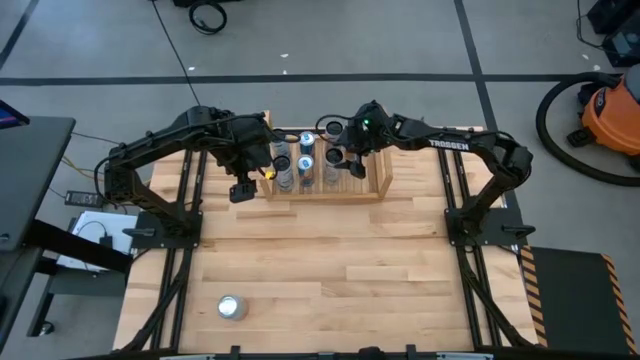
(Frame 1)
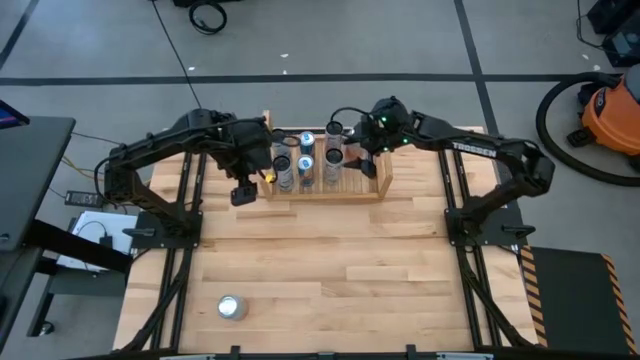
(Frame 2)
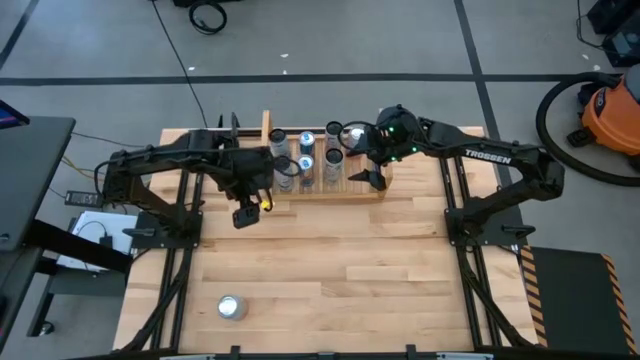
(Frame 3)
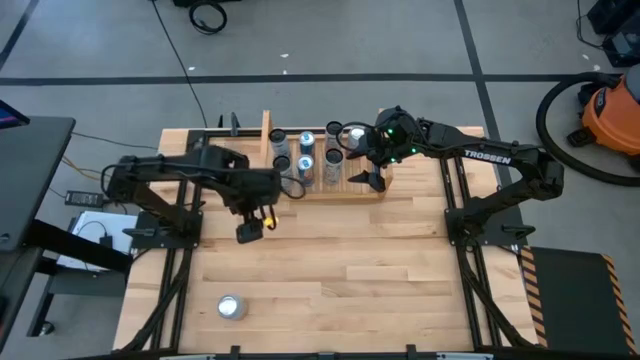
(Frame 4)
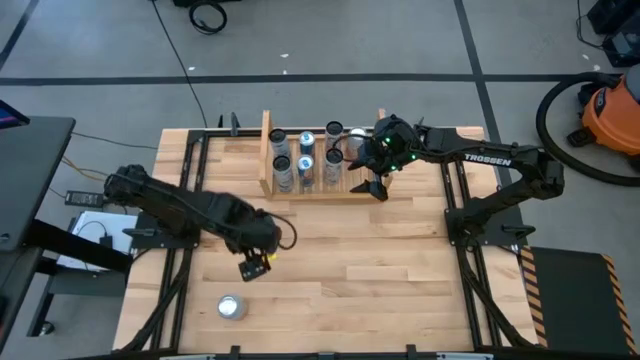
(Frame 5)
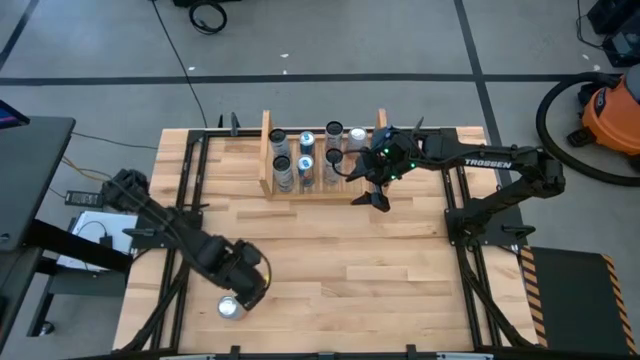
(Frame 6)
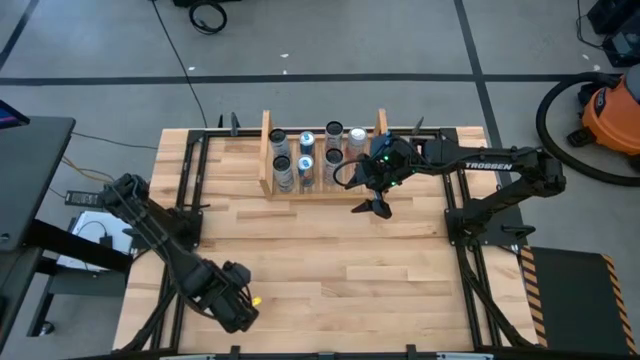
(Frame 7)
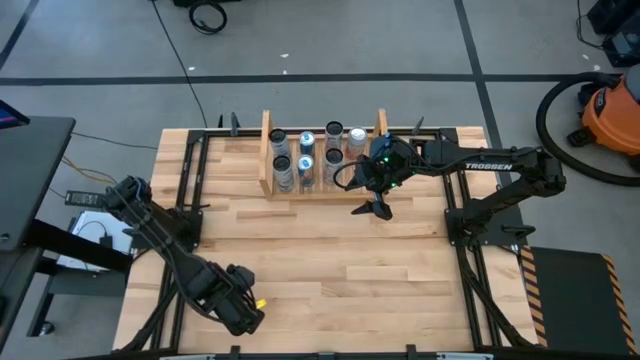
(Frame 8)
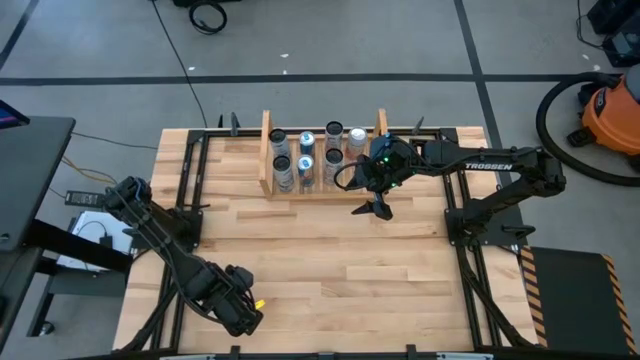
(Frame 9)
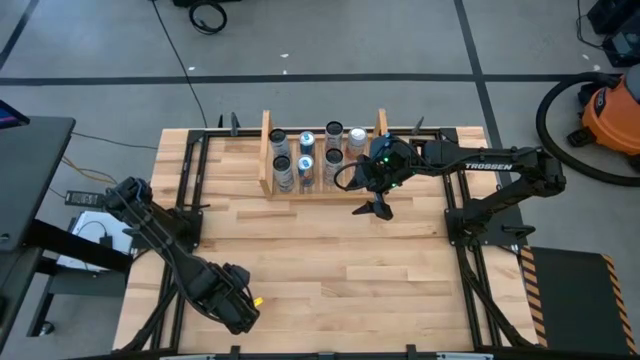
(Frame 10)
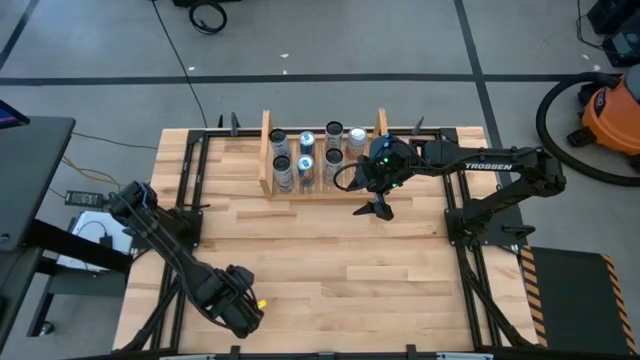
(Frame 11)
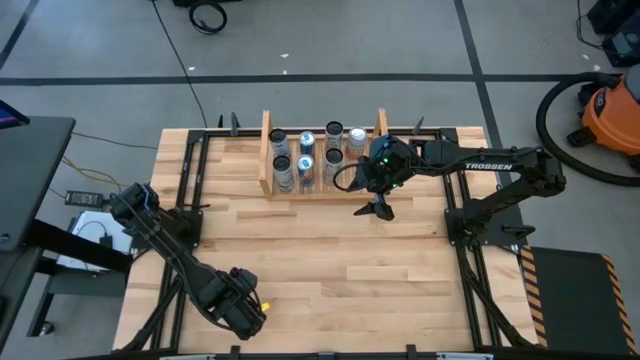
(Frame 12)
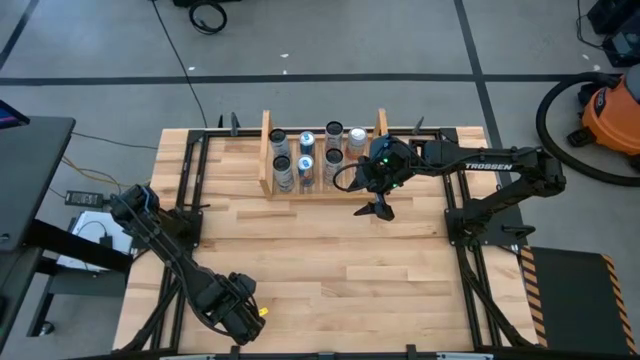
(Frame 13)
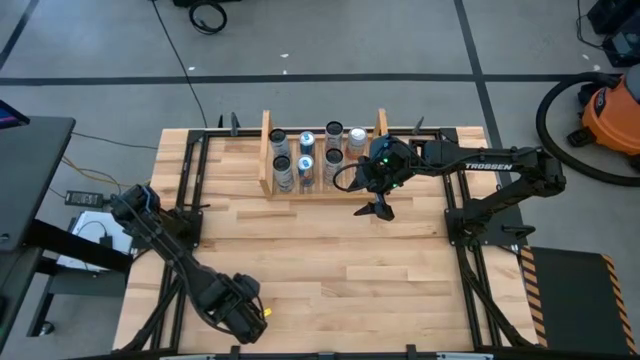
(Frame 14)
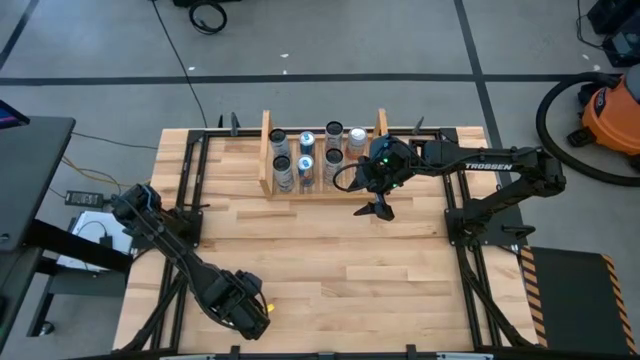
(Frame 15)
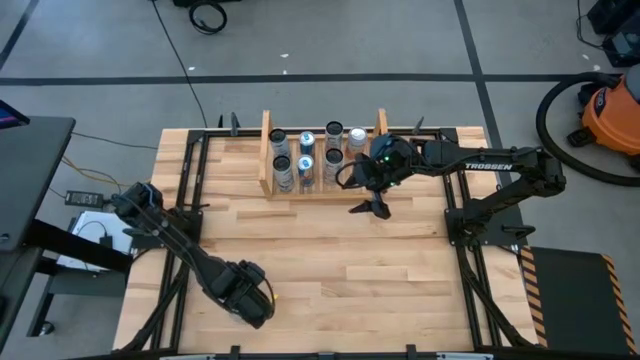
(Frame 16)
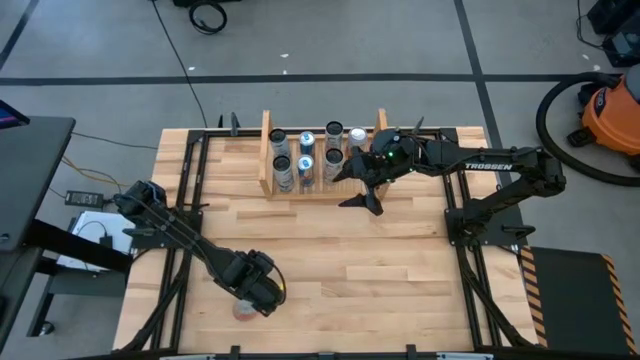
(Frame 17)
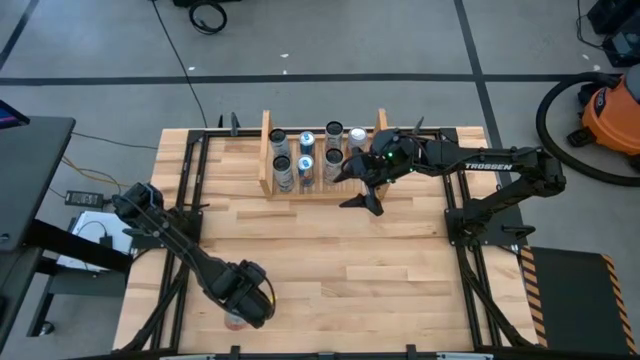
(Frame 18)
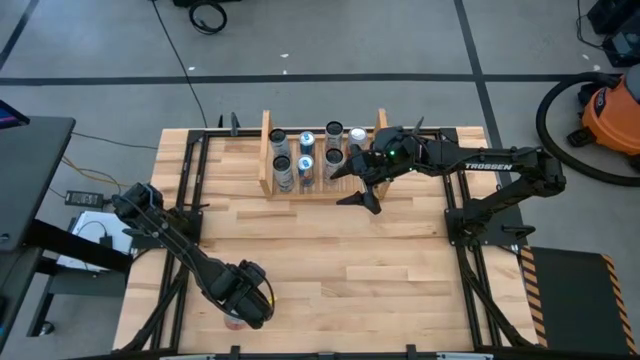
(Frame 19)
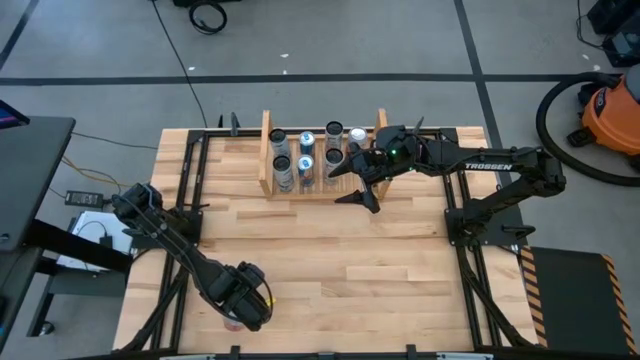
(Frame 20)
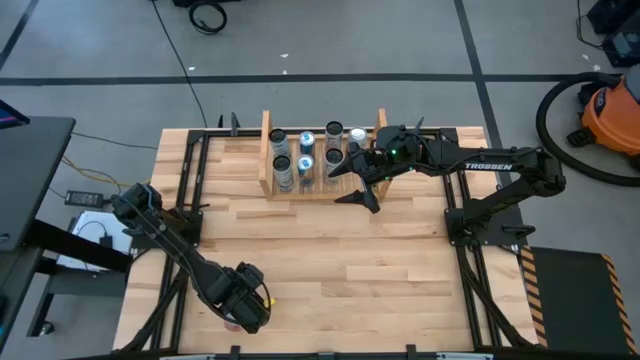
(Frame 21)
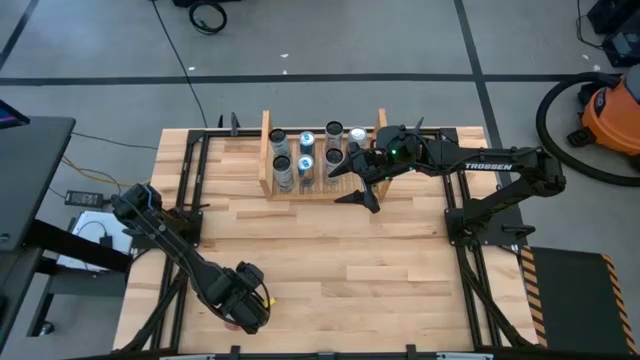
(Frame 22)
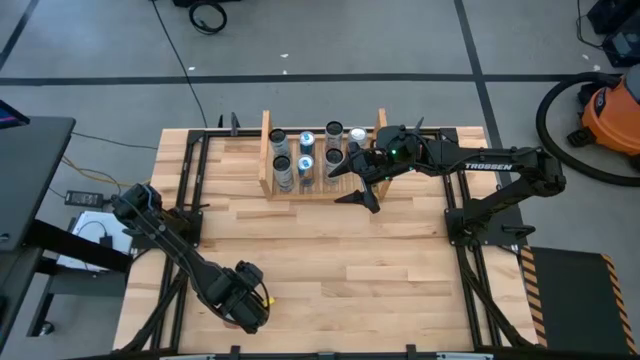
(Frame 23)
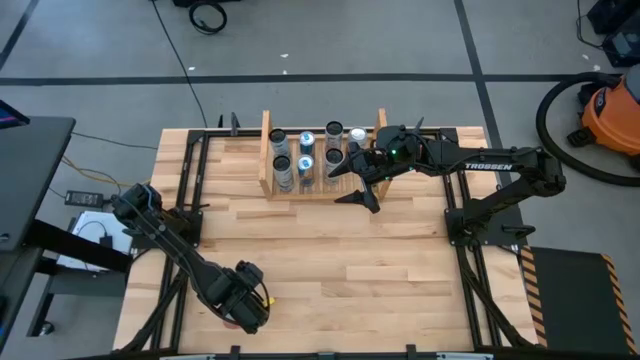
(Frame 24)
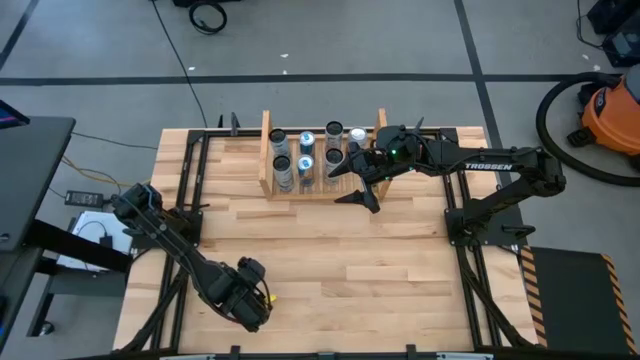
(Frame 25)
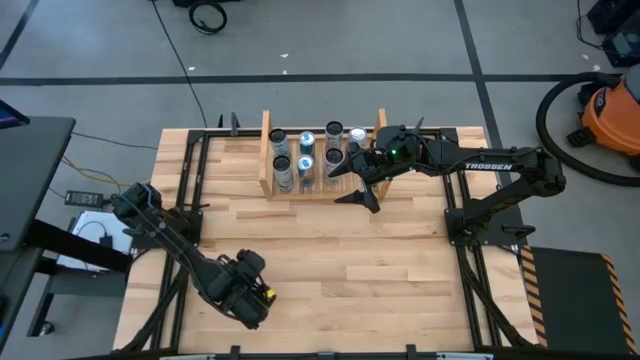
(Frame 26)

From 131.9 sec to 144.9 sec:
Task: Place canned beverage on shelf
Put the orange-white soda can on the shelf aligned with the other orange-white soda can

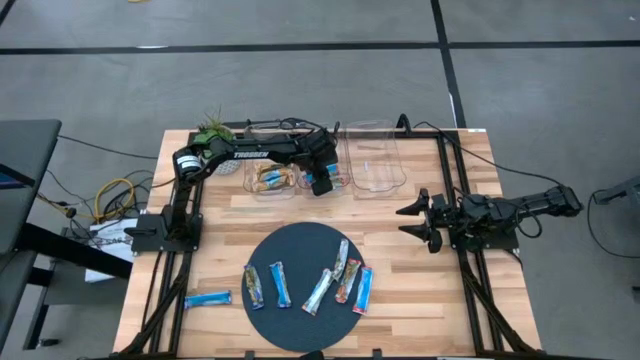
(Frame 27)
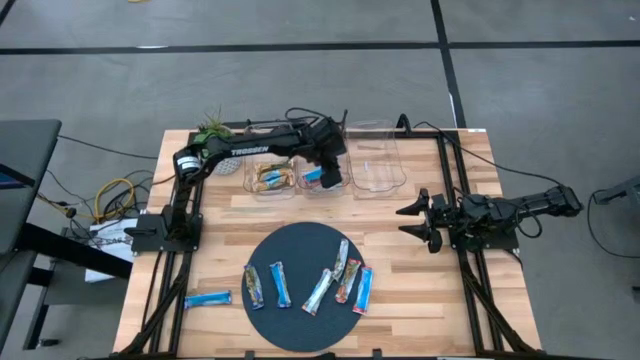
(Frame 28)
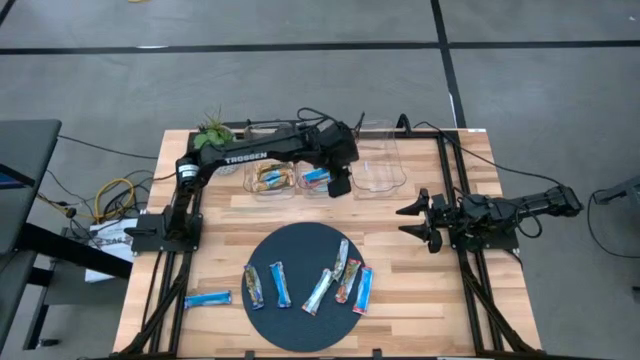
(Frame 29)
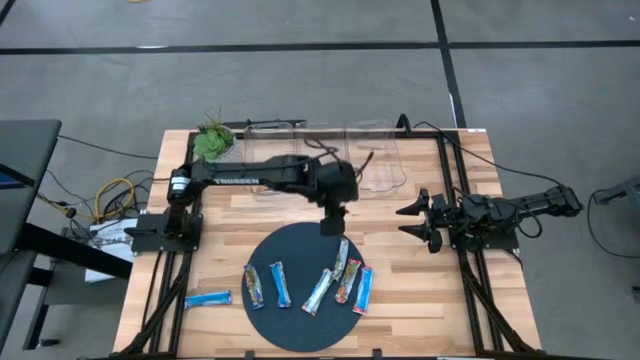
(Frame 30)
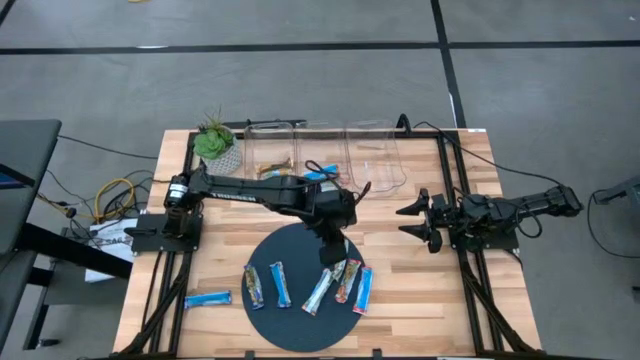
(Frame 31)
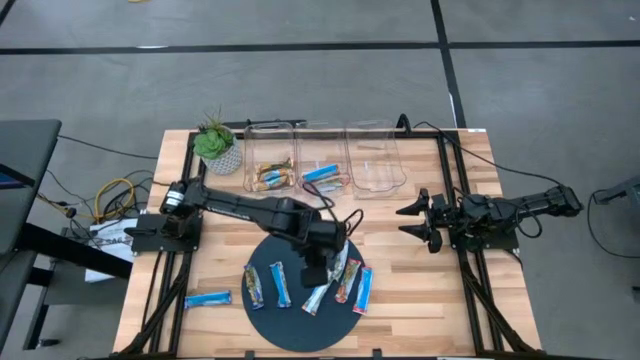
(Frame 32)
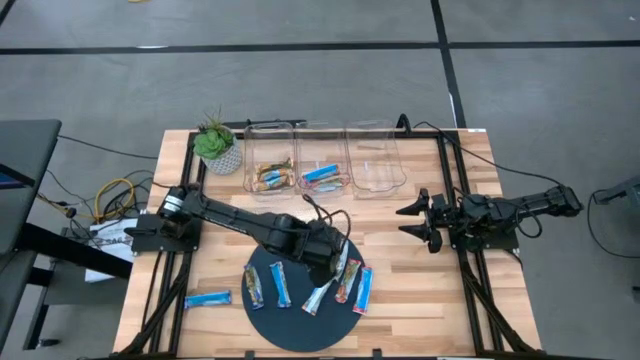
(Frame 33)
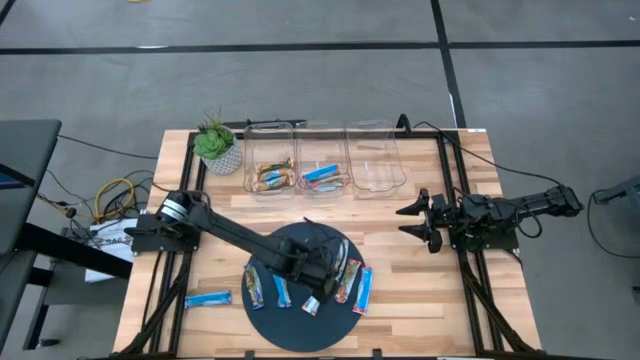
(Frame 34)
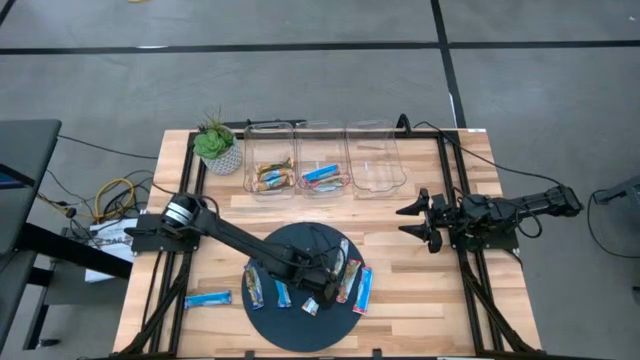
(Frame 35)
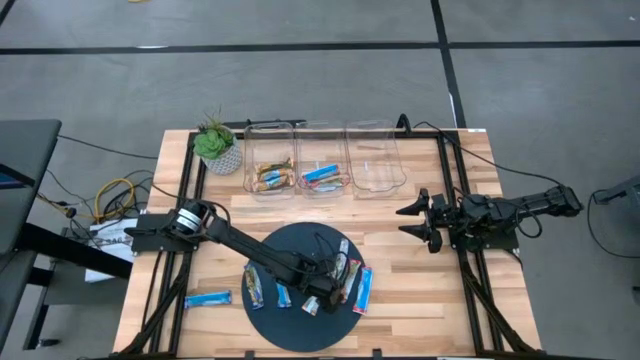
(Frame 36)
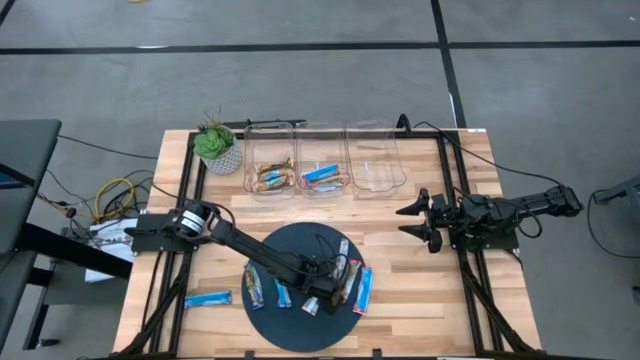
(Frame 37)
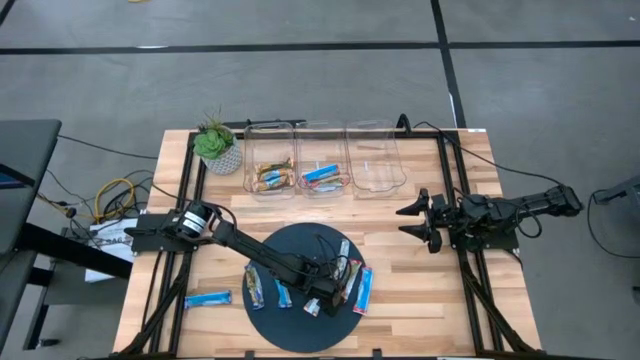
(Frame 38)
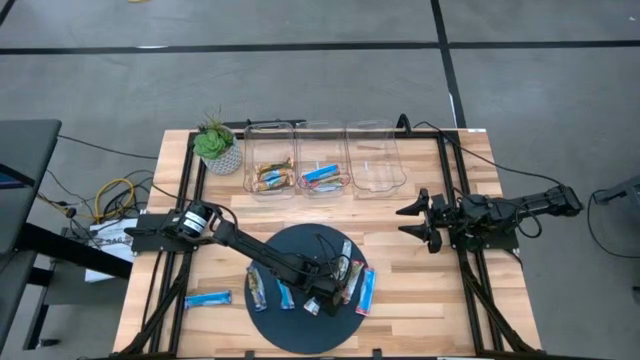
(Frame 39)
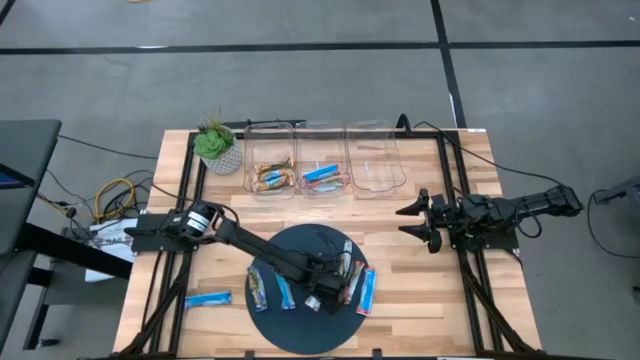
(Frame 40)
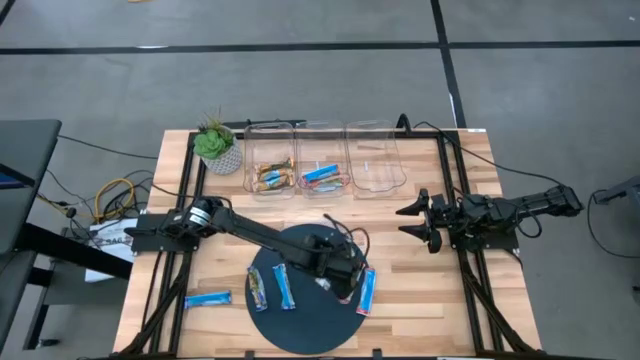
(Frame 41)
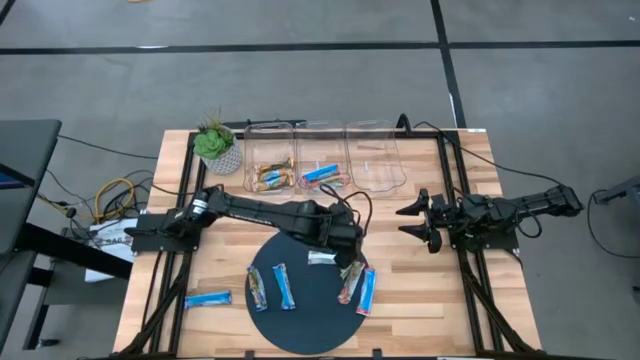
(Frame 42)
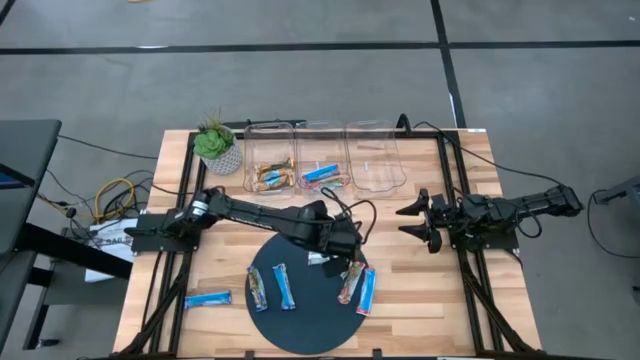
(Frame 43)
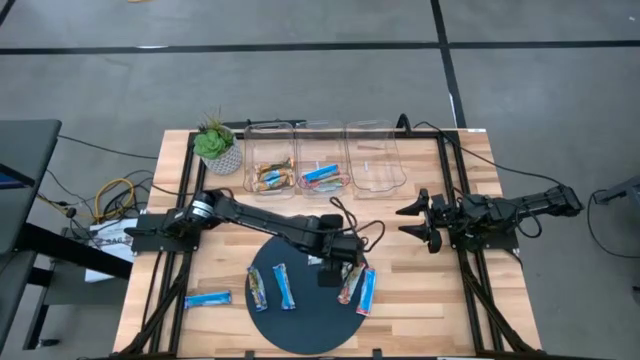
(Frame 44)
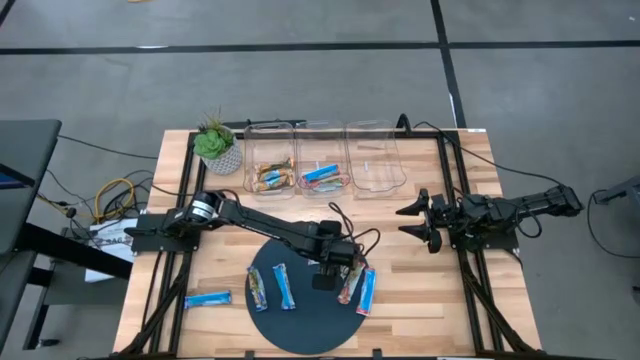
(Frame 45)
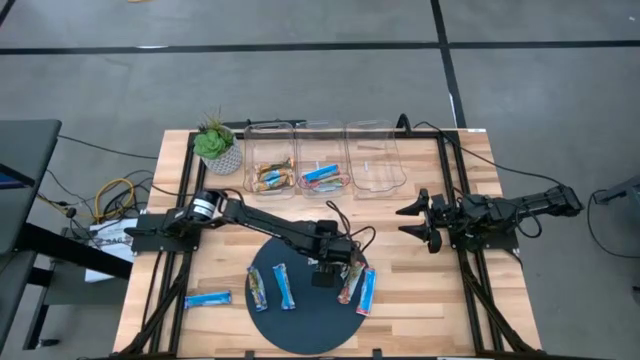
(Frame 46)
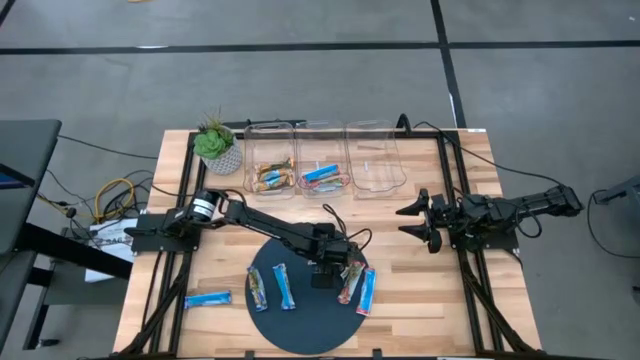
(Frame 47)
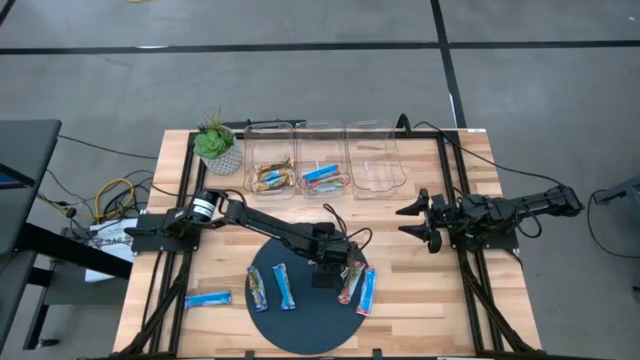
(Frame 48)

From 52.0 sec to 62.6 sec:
Task: Pick and place Granola Bars by type
Put the orange bar into the left transparent bin
